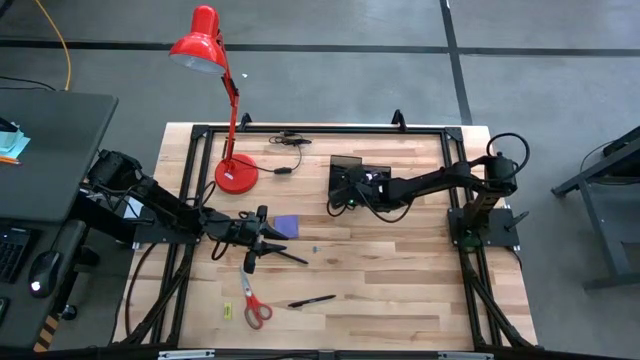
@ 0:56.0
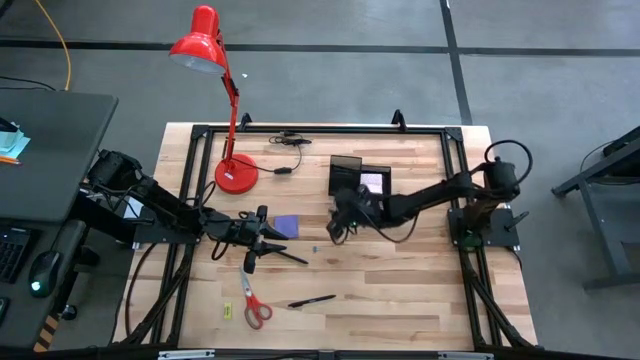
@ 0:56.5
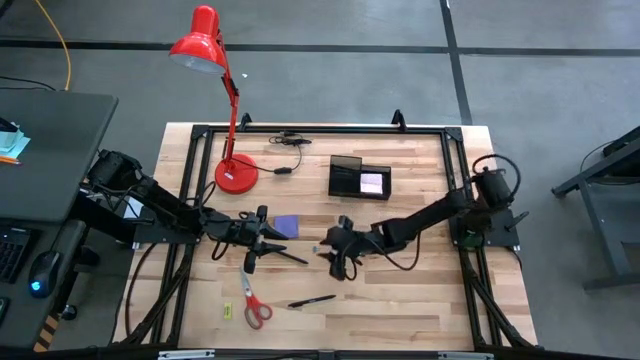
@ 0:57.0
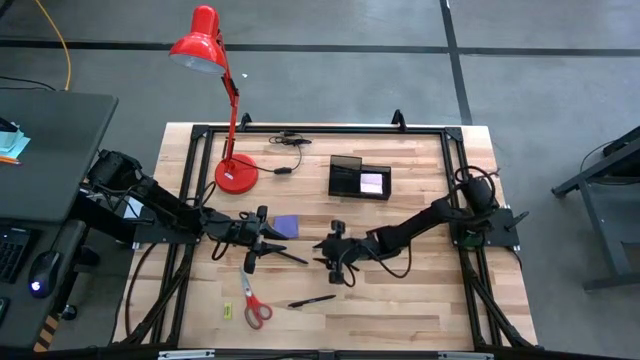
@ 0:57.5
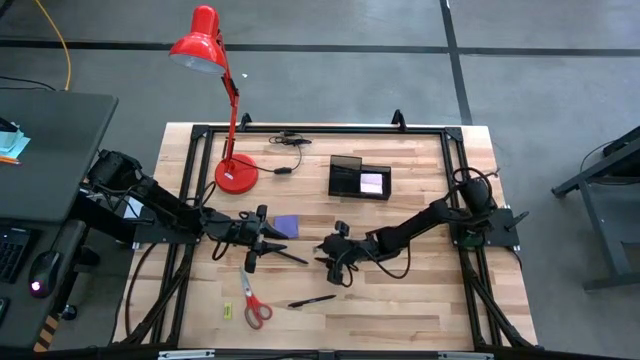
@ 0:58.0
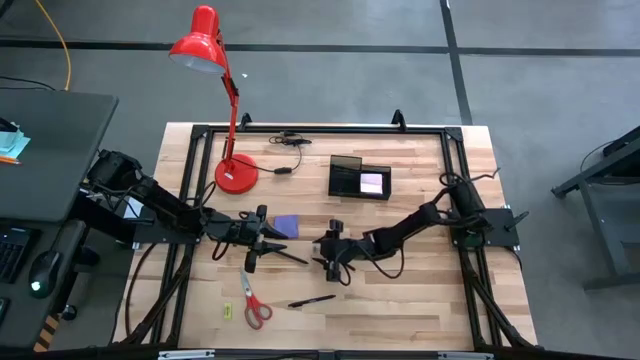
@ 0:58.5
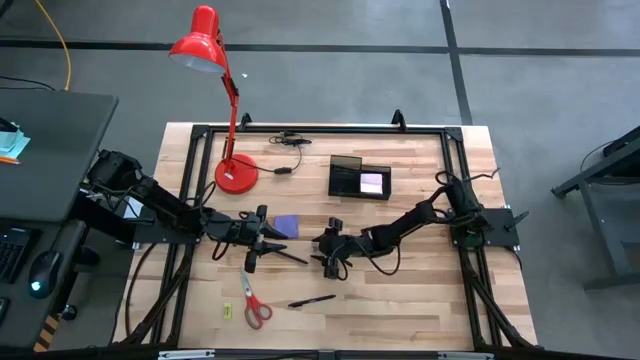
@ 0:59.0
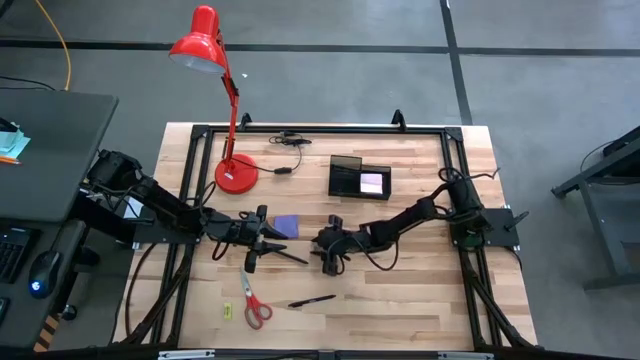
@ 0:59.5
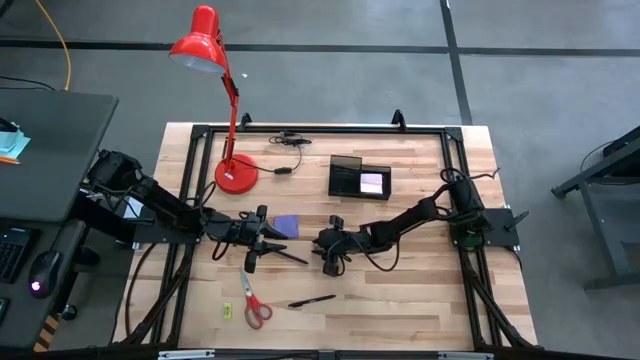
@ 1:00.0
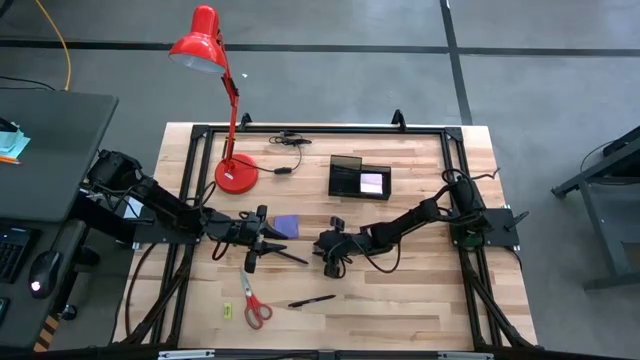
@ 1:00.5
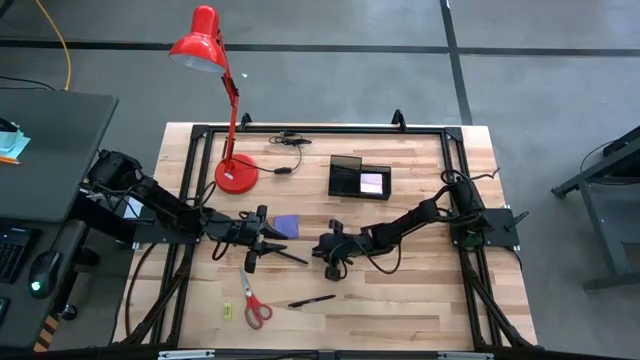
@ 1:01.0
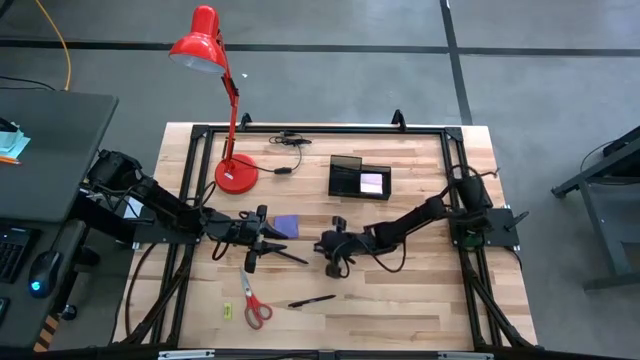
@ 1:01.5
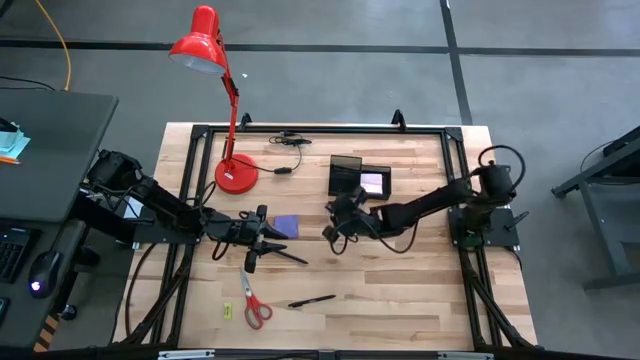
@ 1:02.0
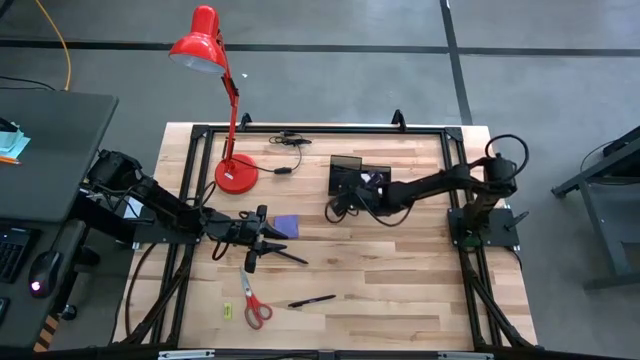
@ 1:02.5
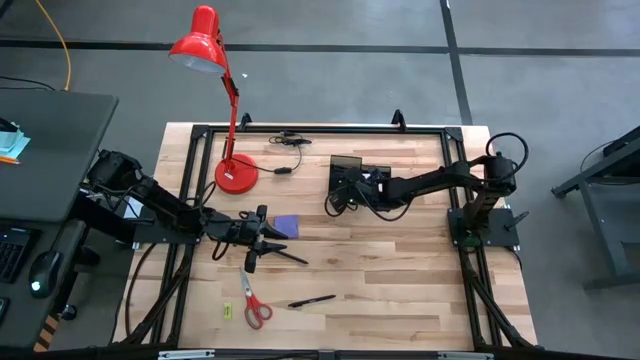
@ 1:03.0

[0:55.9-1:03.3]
Task: Pick and place office supplies into organizer
Put the blue binder clip into the black desk organizer

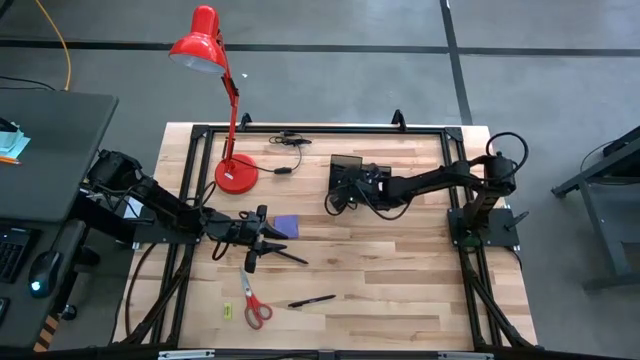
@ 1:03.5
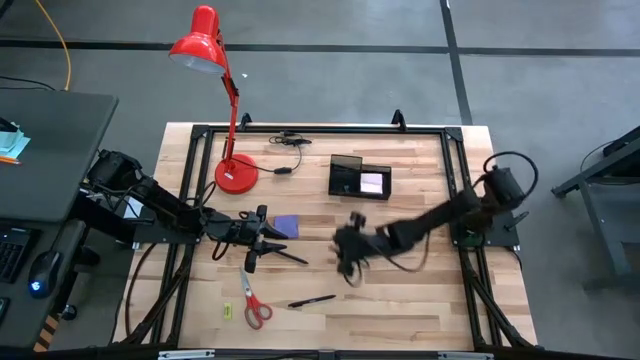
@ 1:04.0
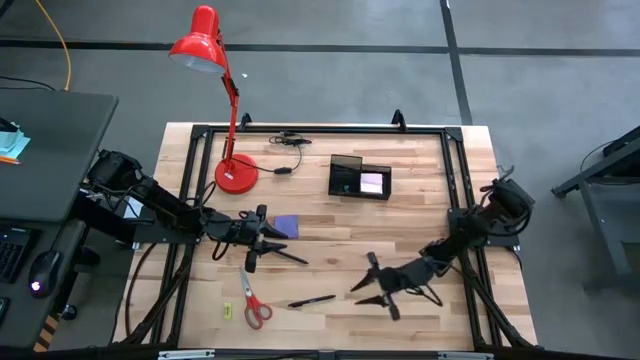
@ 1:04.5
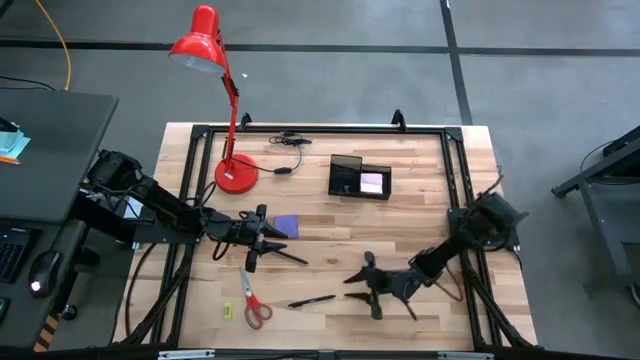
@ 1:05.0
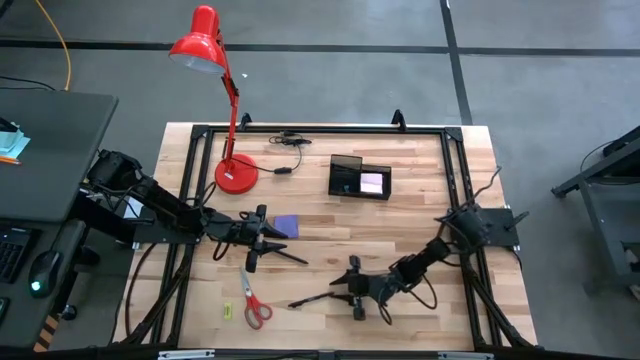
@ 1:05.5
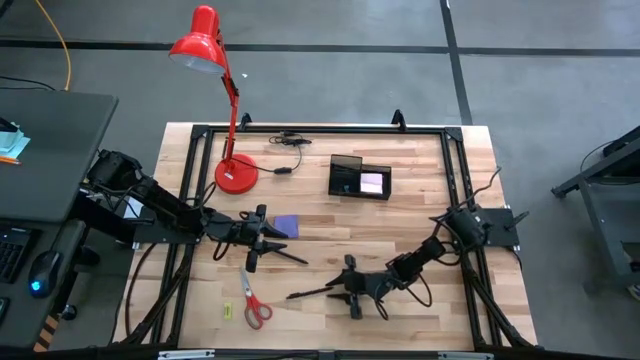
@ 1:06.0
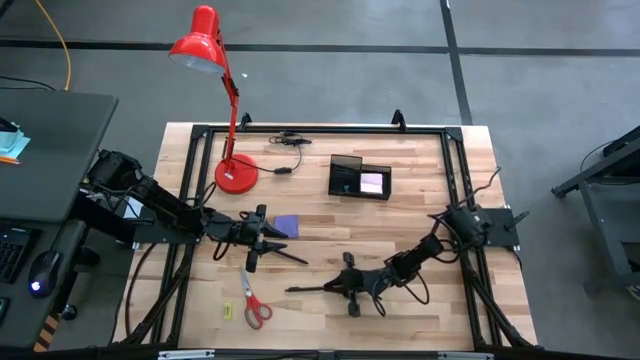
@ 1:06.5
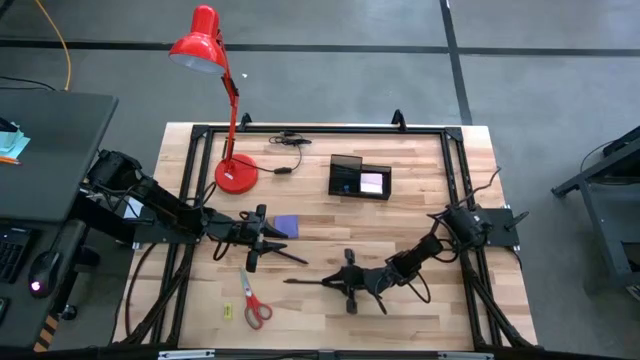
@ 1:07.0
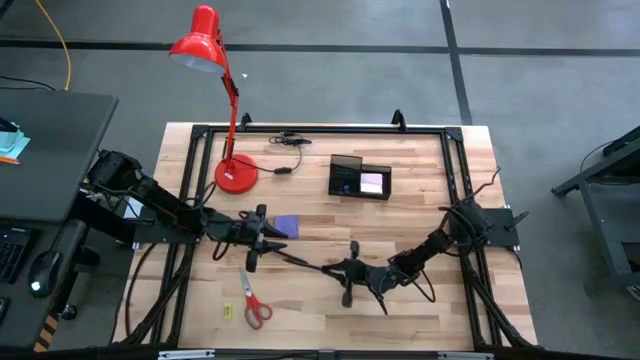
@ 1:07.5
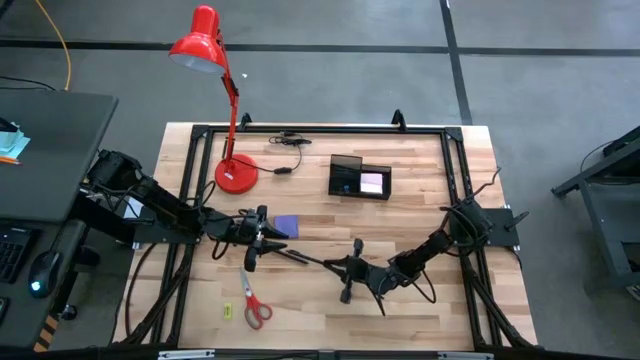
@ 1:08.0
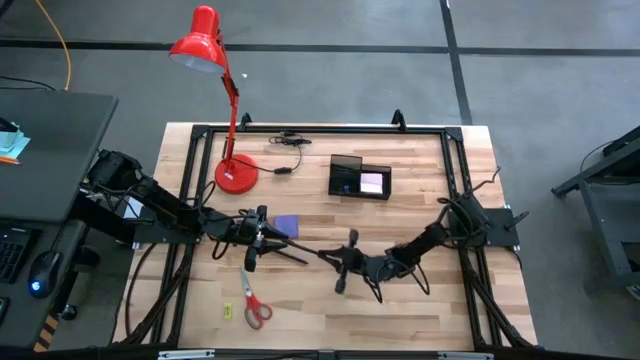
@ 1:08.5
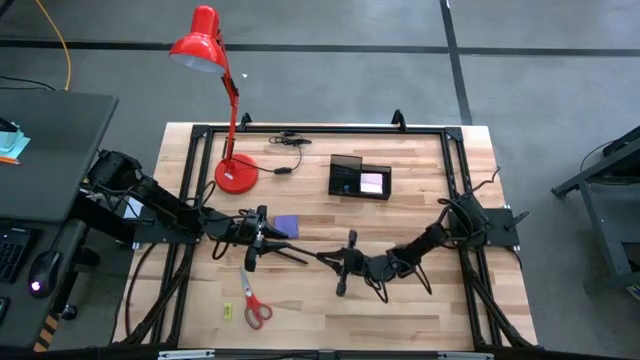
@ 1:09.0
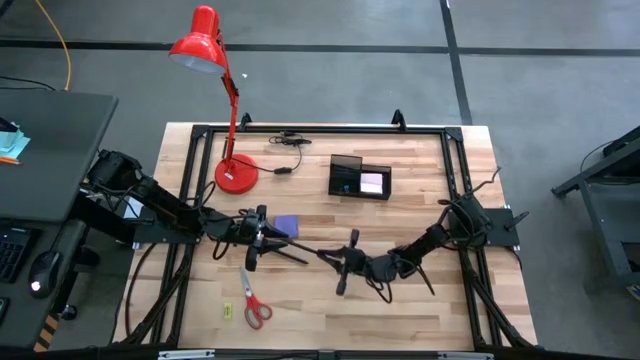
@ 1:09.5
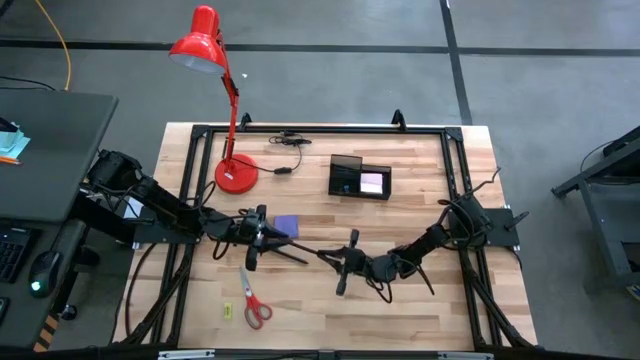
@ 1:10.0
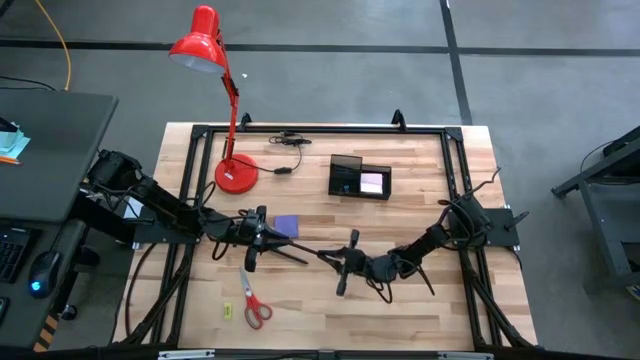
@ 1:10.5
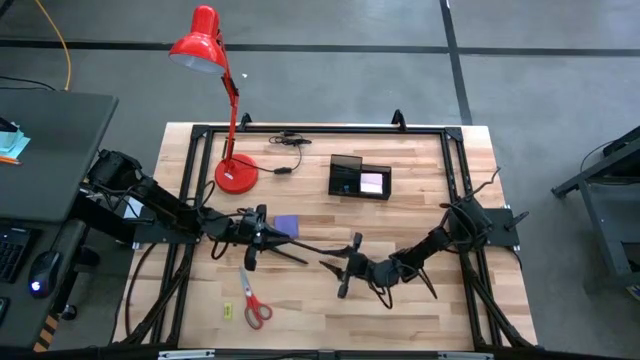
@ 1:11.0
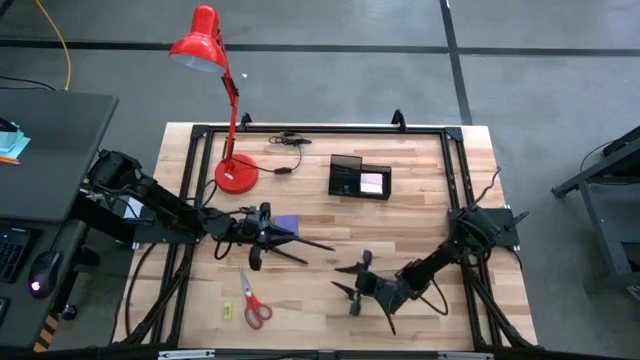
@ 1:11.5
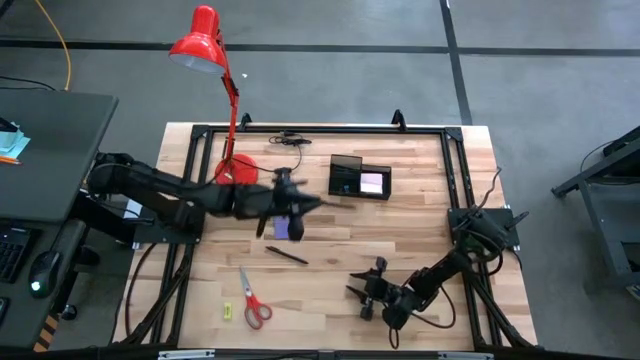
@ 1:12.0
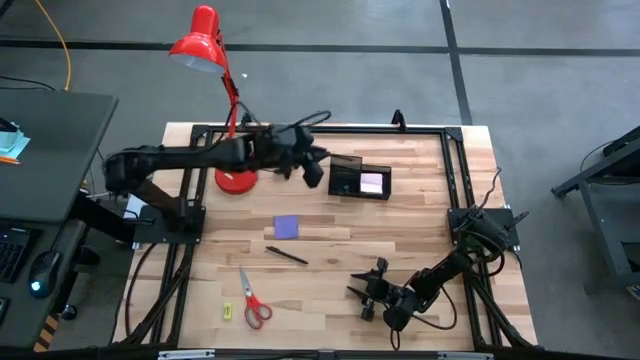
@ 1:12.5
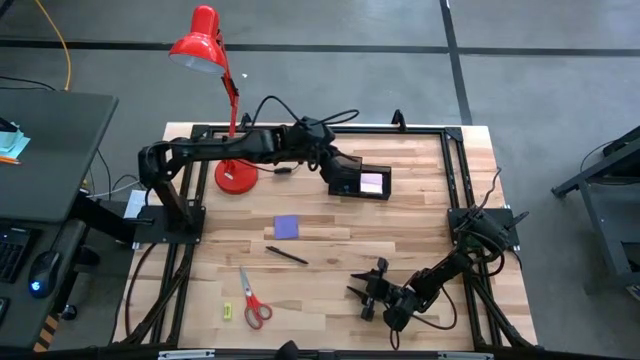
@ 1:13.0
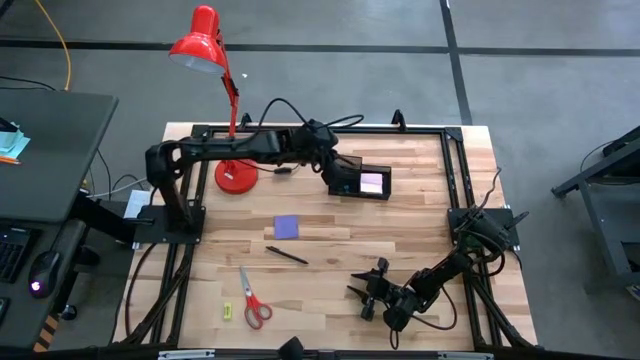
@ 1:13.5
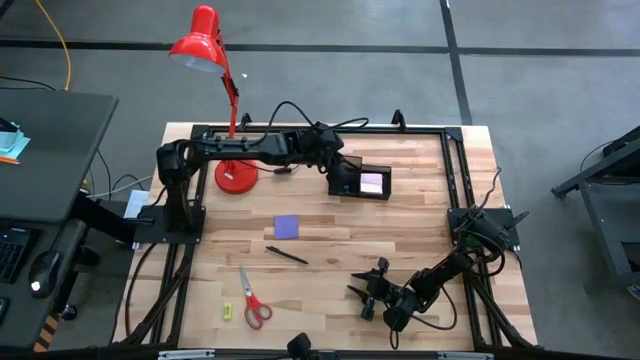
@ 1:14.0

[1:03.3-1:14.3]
Put the black pen into the black desk organizer

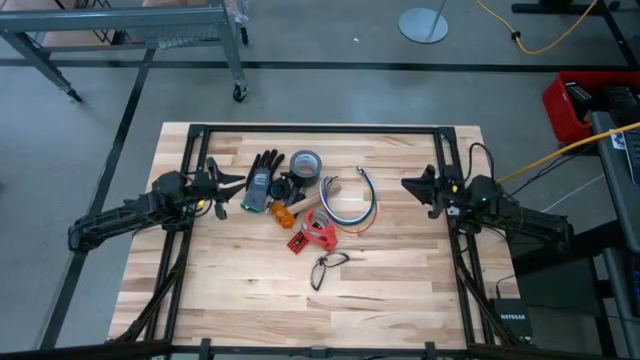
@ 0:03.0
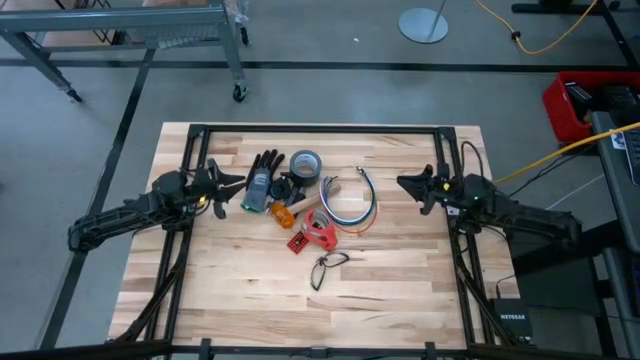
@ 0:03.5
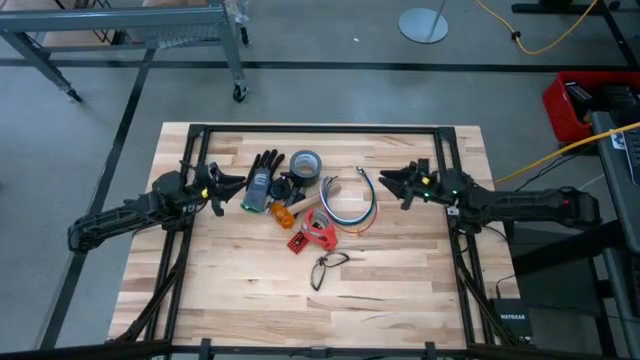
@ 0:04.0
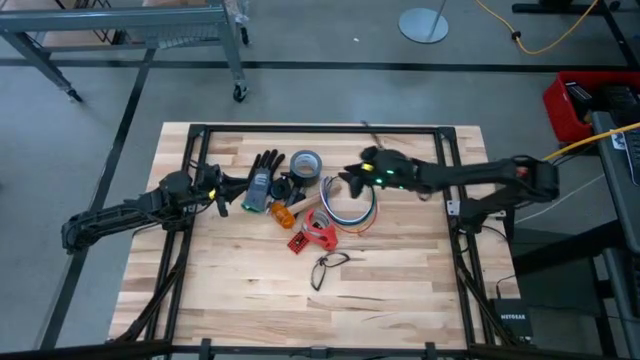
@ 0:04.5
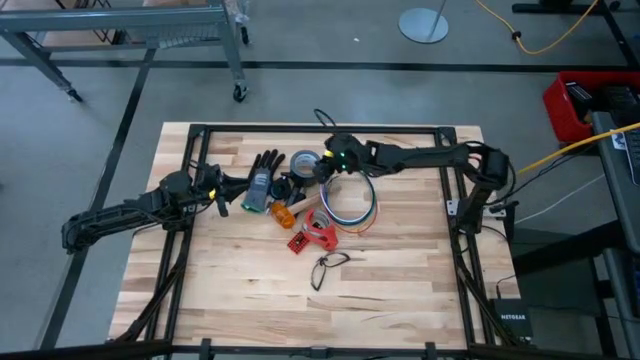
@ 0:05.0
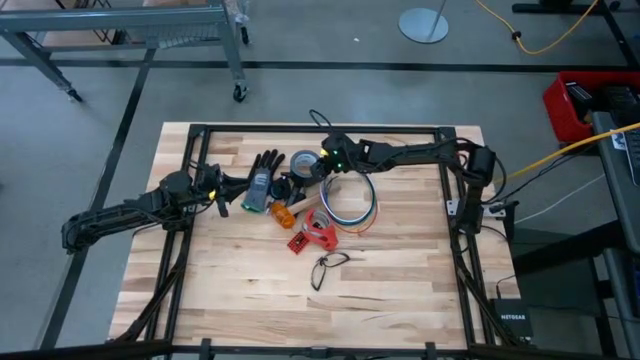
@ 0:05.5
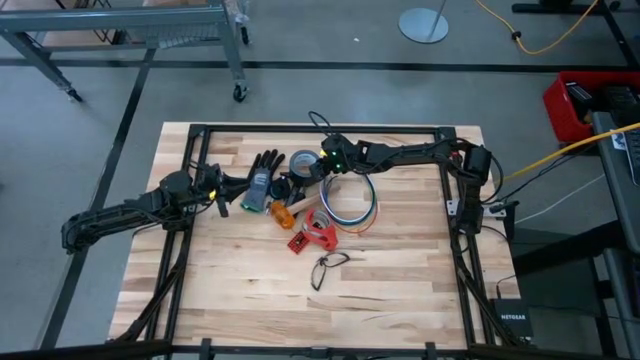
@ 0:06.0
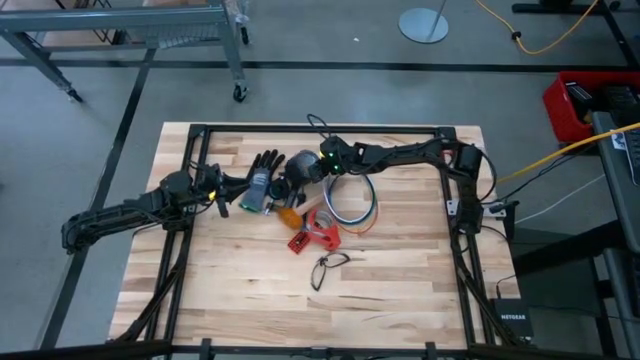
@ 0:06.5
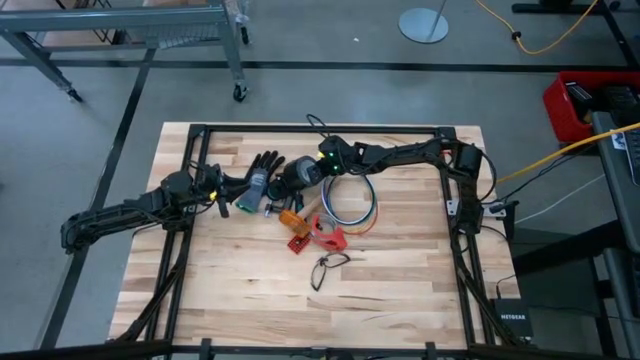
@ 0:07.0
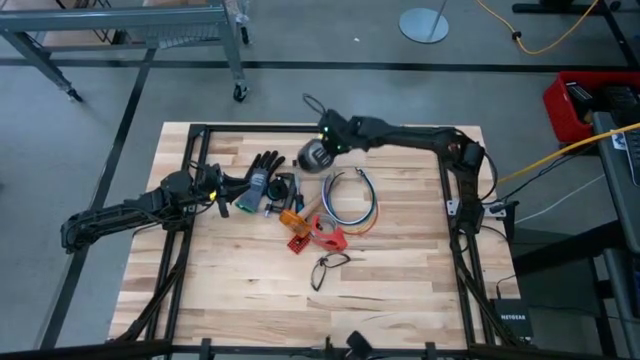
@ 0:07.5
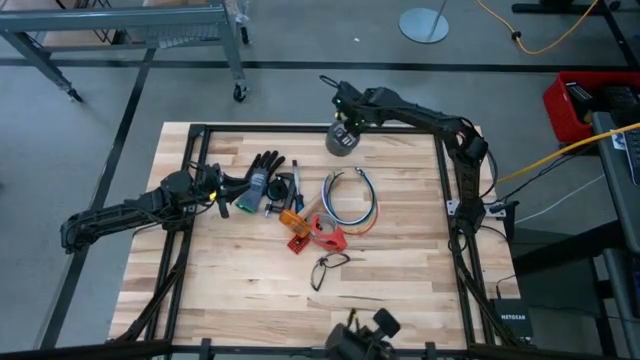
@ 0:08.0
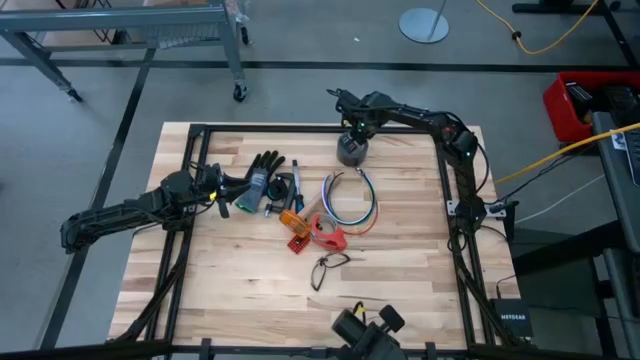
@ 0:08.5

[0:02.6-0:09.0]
Task: Coil cords
Move the electrical tape to the top center
